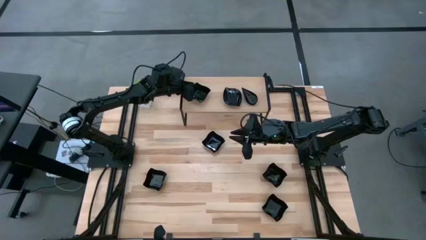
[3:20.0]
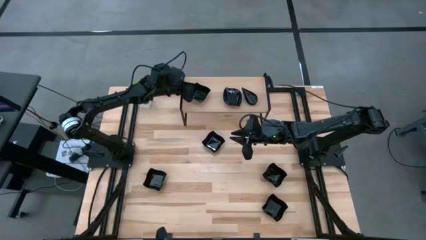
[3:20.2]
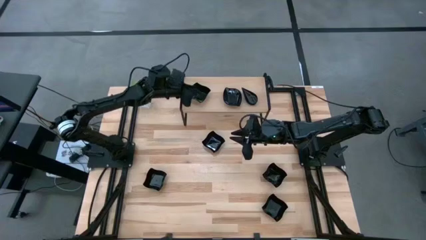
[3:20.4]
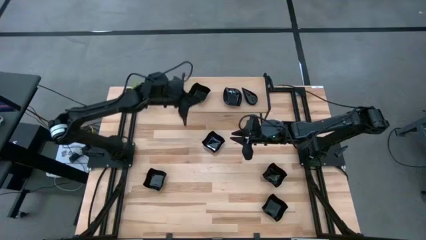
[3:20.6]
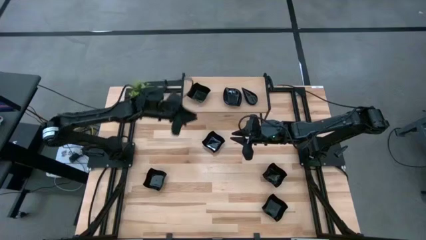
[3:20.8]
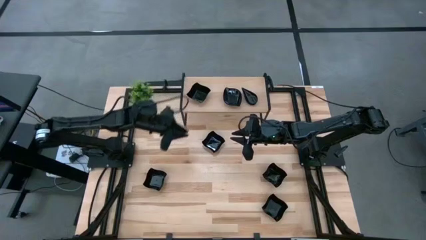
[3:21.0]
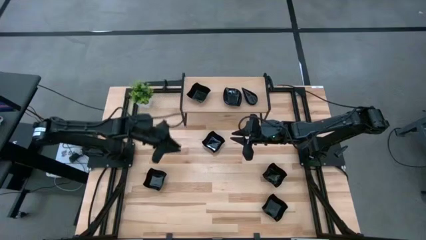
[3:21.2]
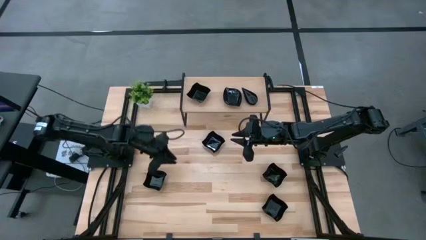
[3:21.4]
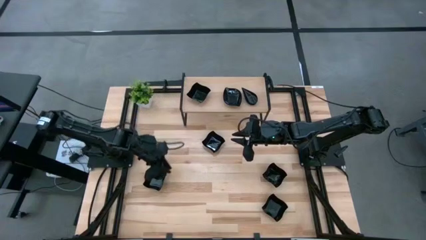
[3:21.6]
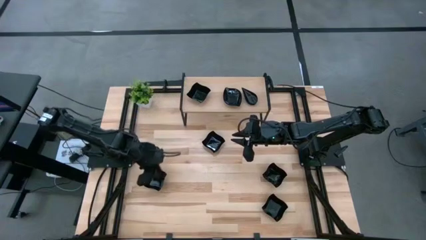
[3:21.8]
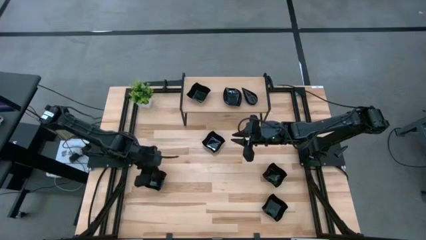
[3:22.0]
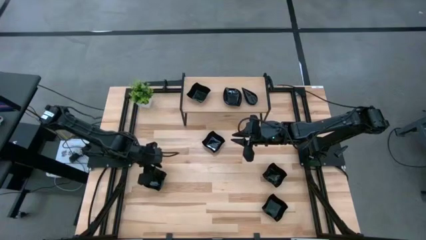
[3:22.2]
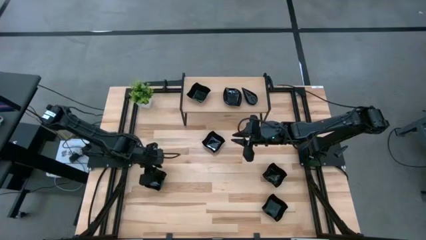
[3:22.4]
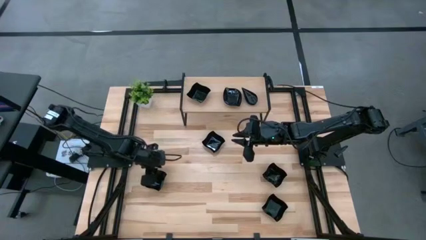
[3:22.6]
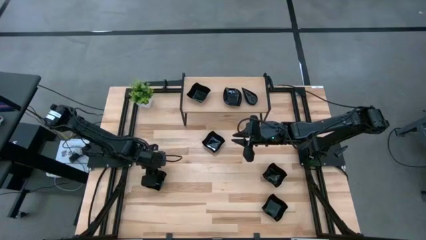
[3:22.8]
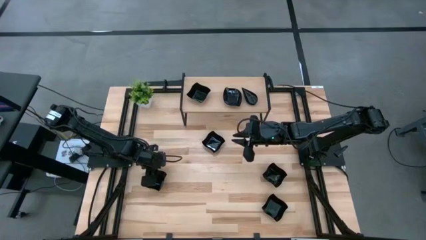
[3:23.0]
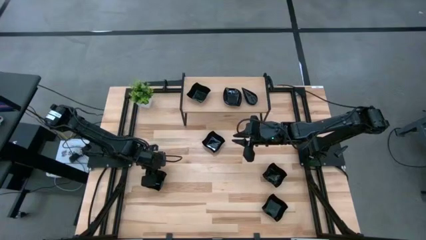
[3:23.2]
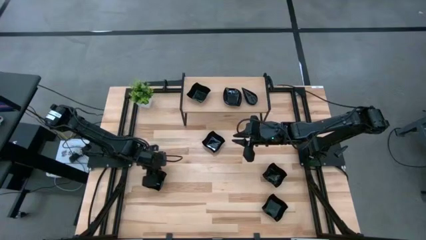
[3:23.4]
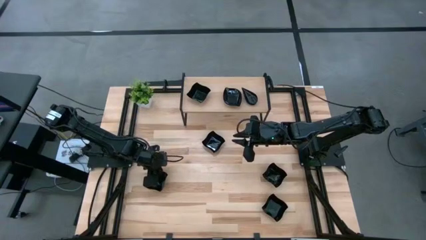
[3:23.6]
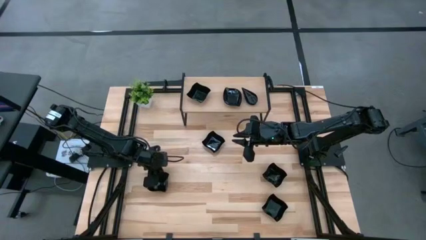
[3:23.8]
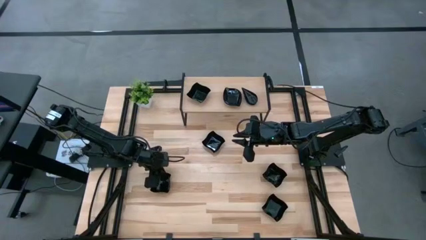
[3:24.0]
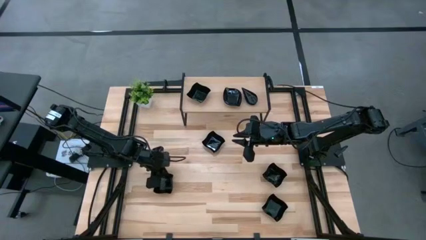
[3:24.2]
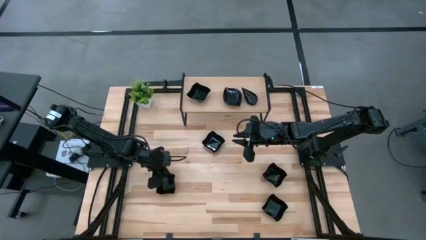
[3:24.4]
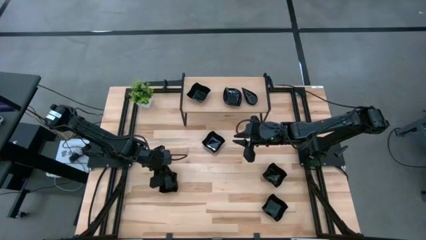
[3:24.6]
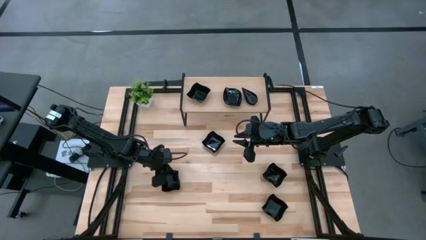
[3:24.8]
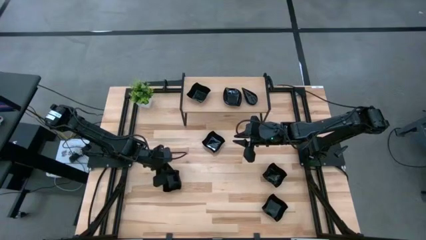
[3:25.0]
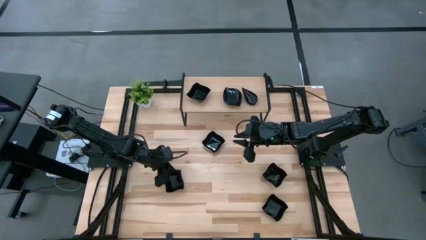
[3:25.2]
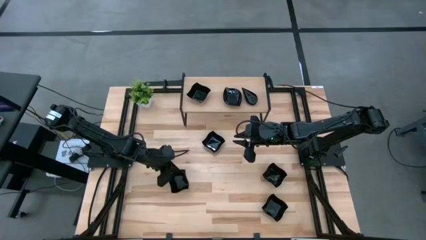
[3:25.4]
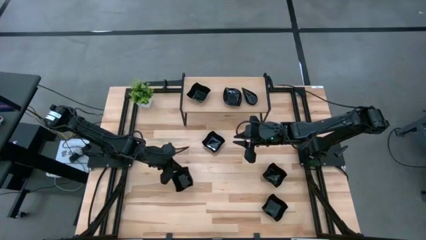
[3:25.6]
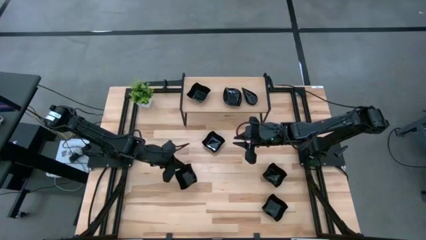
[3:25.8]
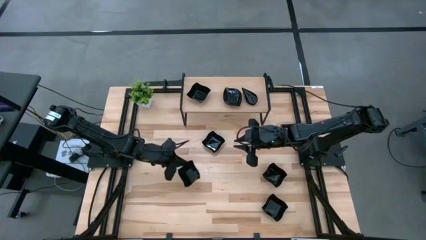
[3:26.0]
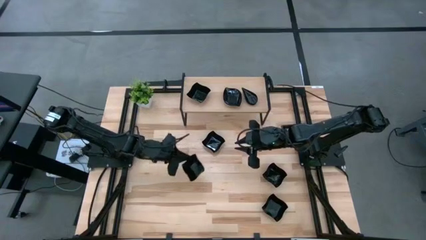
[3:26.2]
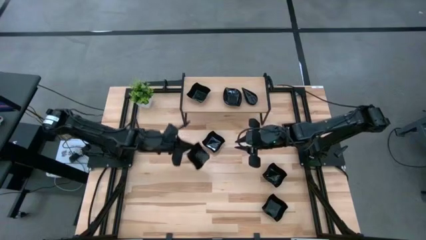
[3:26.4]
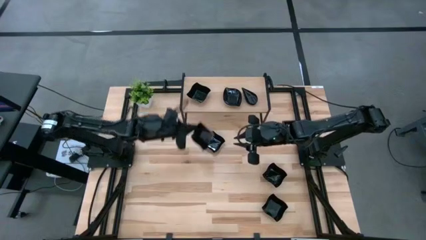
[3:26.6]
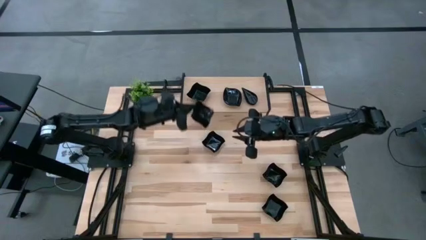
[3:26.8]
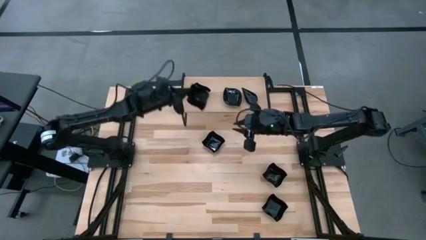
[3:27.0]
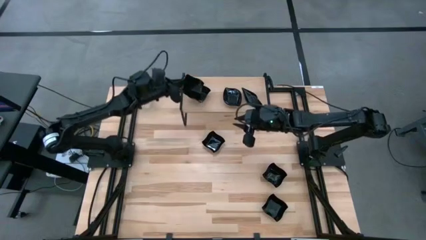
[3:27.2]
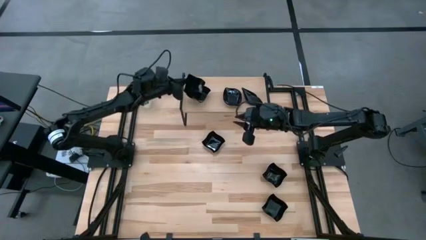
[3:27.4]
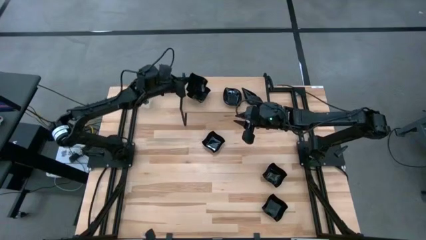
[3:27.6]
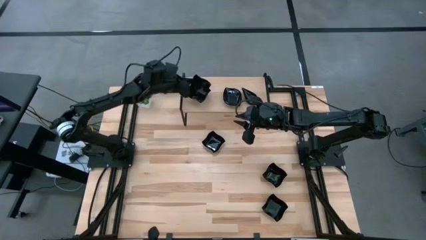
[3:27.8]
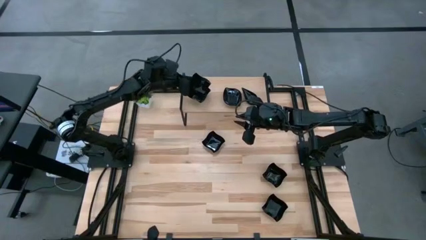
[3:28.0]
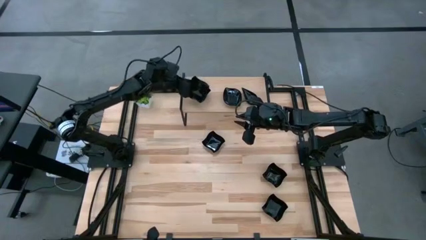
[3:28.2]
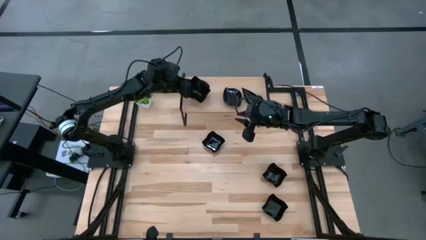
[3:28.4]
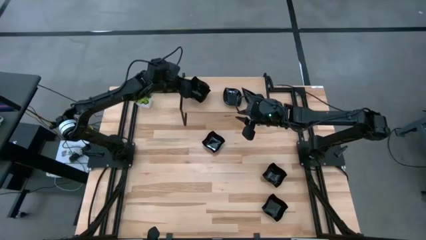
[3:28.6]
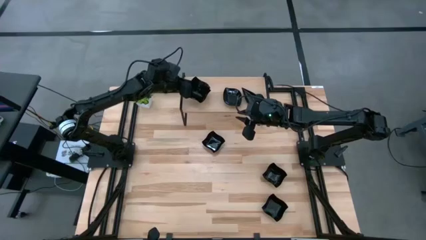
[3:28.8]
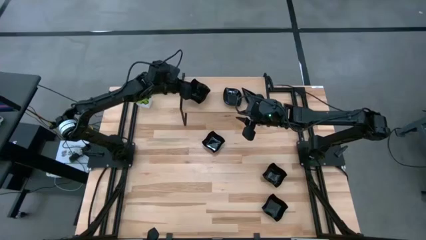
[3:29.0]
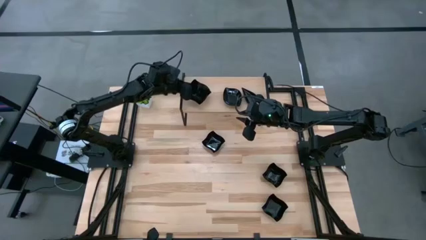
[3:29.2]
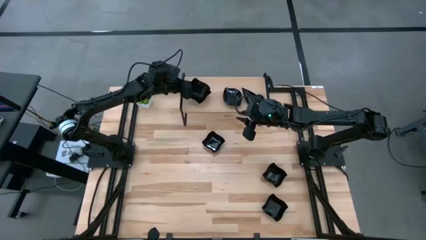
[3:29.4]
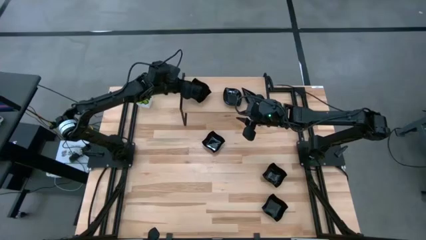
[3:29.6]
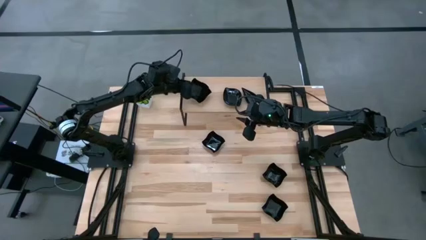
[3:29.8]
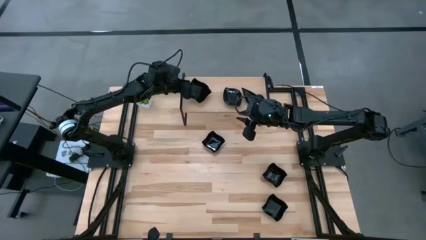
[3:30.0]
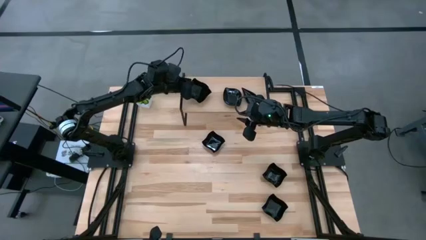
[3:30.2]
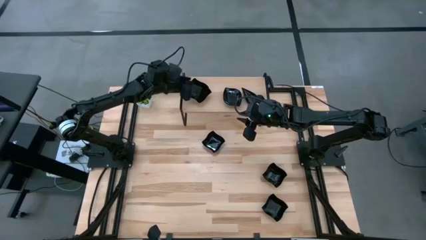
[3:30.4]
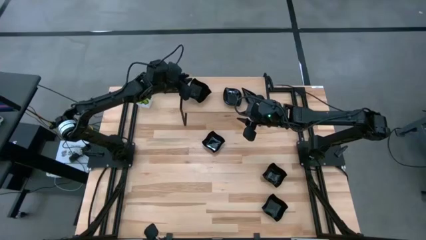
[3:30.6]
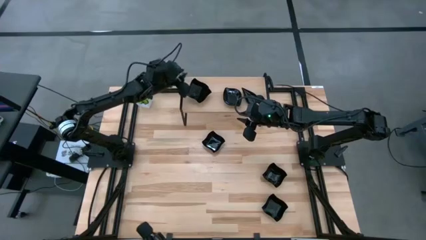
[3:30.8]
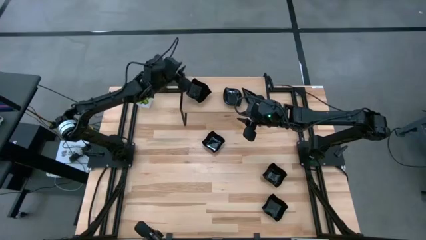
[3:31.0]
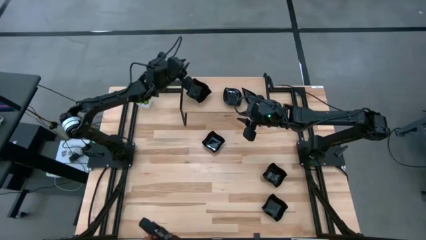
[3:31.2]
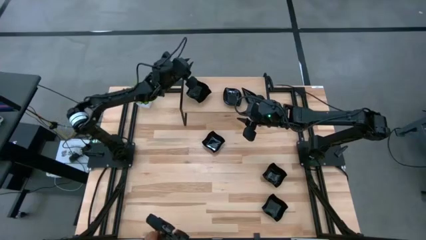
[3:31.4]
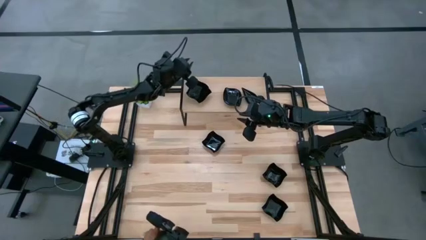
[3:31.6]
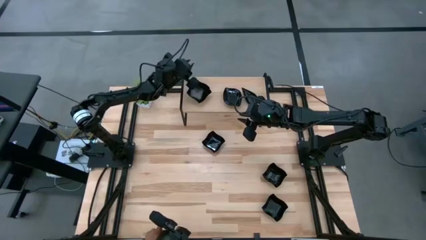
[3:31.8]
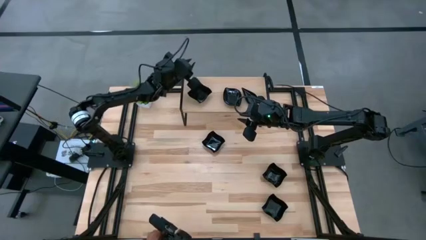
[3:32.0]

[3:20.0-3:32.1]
Task: Pick & Place Mini shaped plates
Stack the black wave square shaped plate on top of the black wave square shaped plate on the shelf
